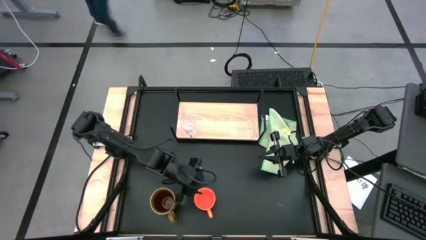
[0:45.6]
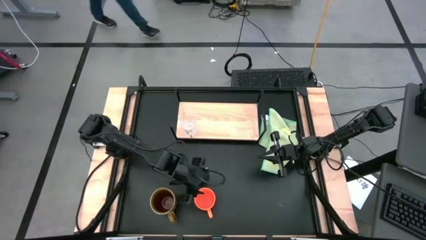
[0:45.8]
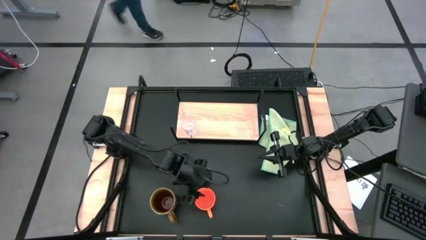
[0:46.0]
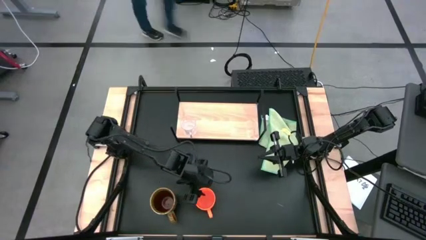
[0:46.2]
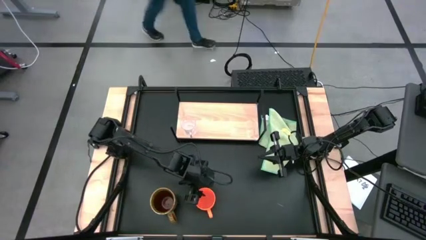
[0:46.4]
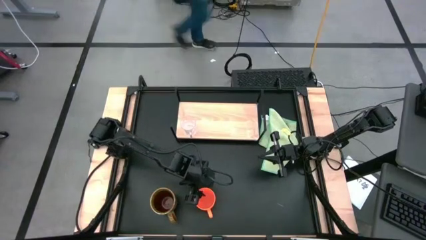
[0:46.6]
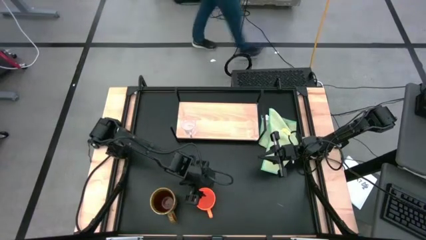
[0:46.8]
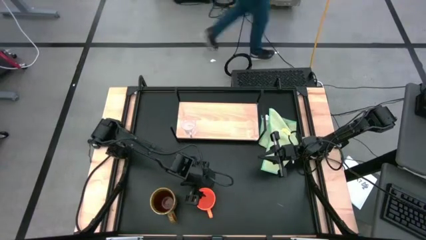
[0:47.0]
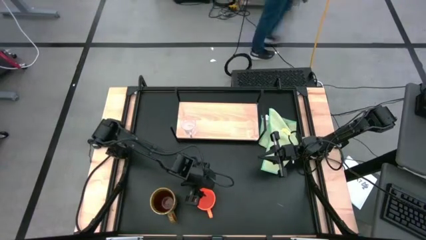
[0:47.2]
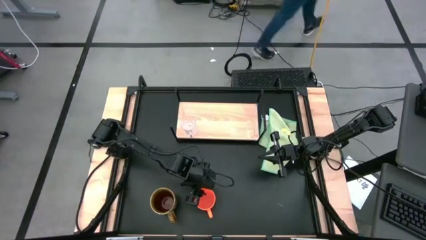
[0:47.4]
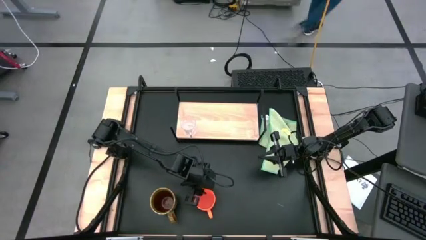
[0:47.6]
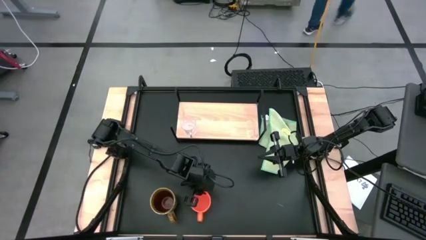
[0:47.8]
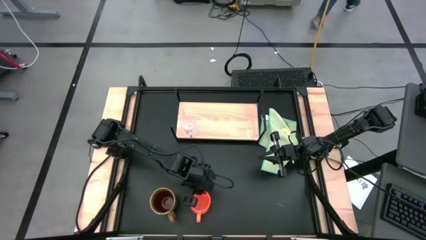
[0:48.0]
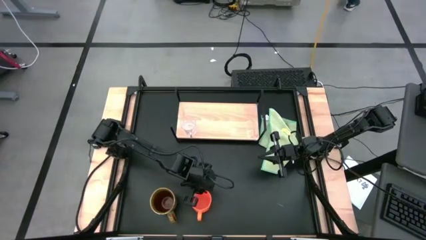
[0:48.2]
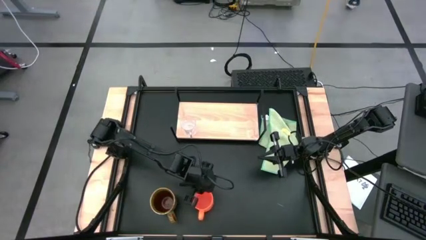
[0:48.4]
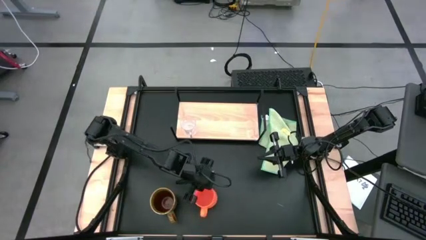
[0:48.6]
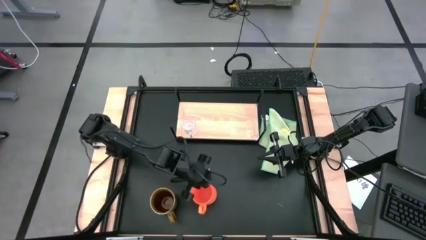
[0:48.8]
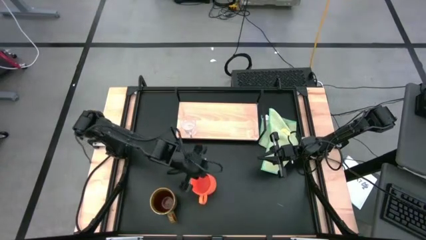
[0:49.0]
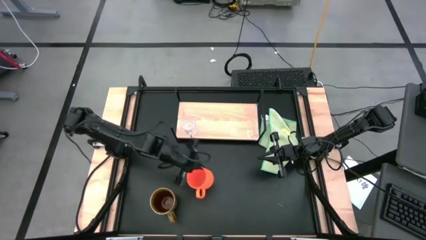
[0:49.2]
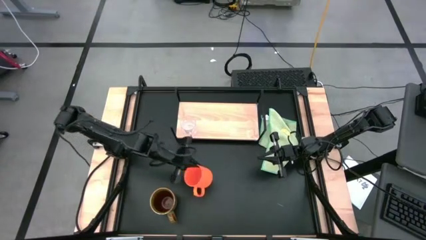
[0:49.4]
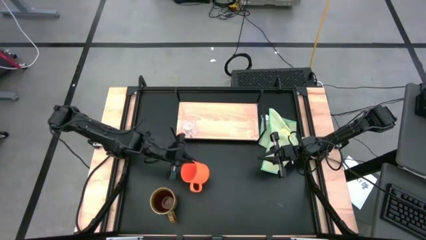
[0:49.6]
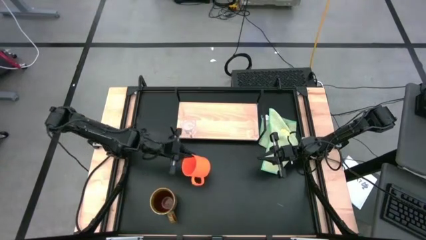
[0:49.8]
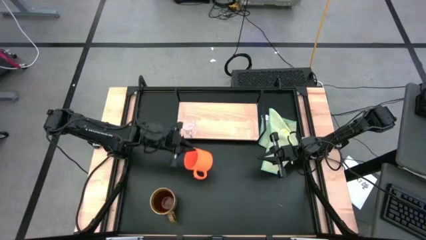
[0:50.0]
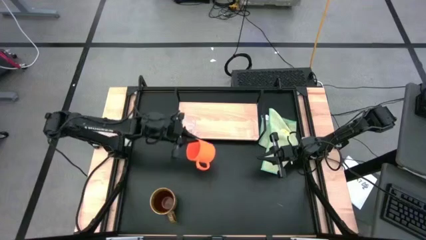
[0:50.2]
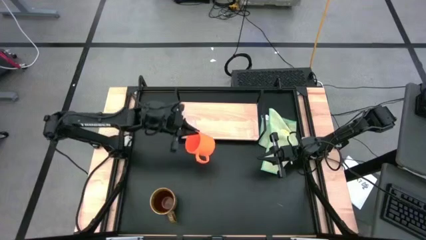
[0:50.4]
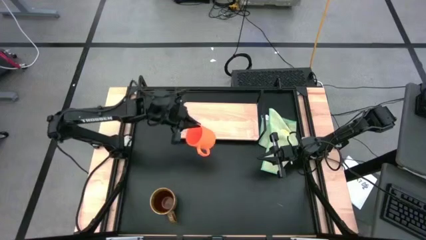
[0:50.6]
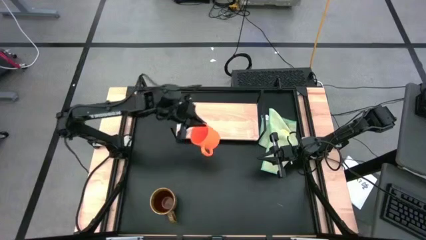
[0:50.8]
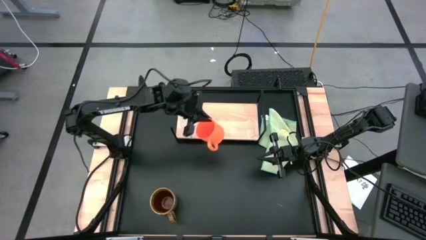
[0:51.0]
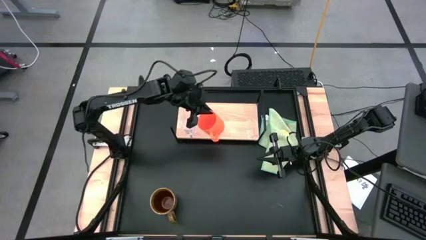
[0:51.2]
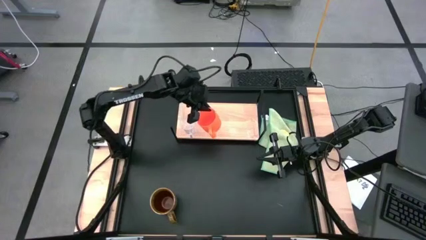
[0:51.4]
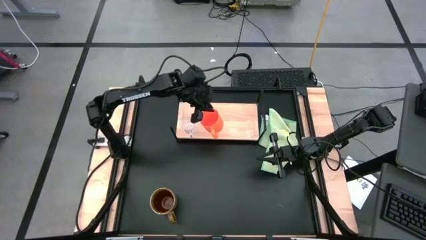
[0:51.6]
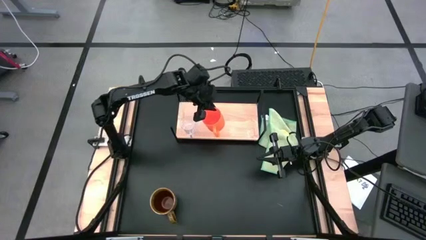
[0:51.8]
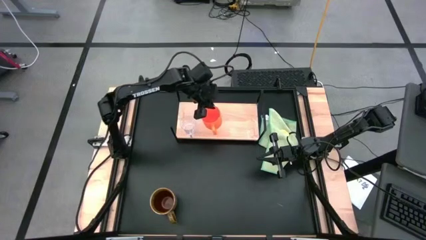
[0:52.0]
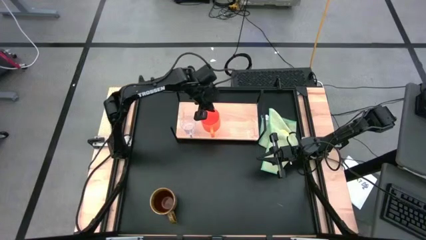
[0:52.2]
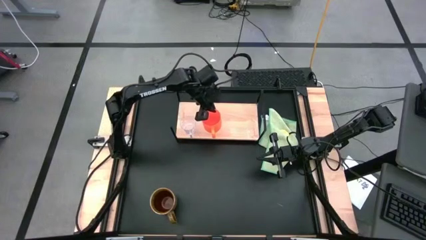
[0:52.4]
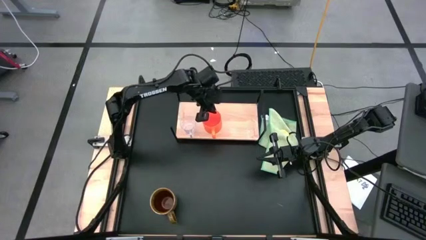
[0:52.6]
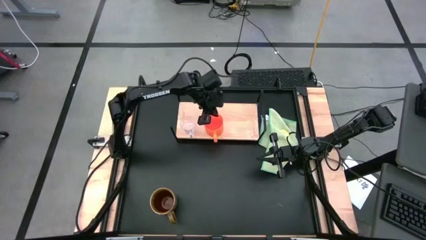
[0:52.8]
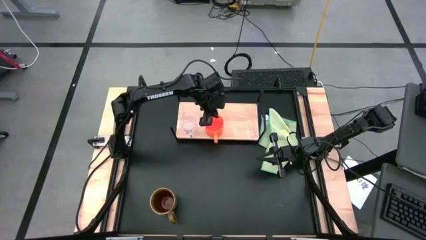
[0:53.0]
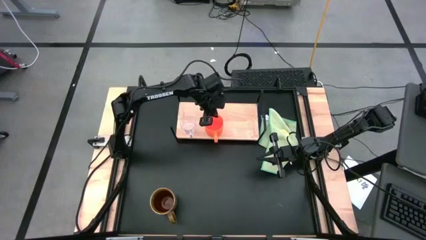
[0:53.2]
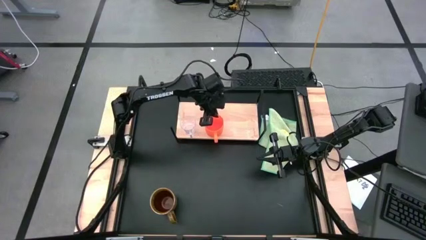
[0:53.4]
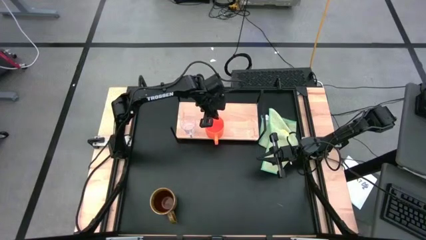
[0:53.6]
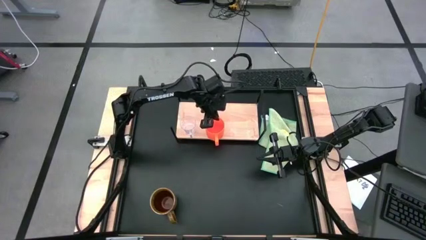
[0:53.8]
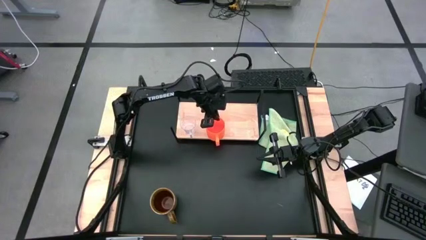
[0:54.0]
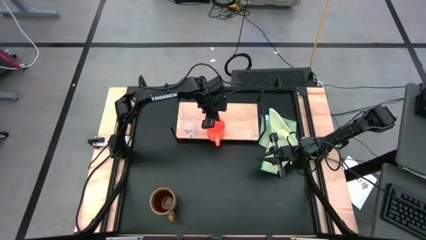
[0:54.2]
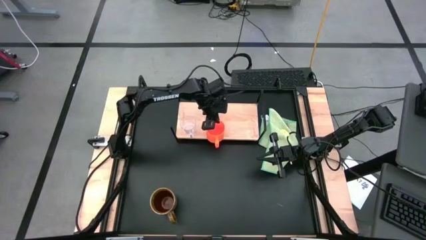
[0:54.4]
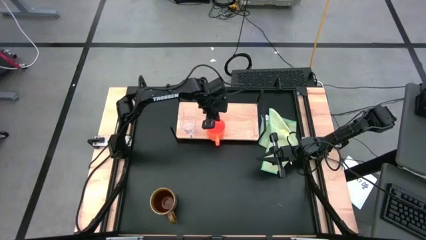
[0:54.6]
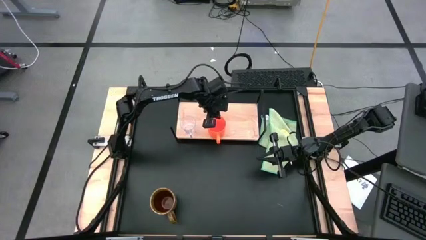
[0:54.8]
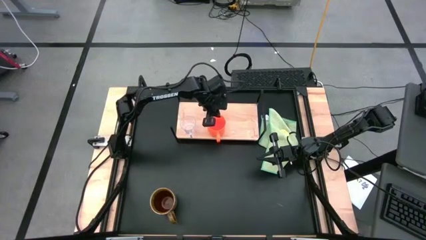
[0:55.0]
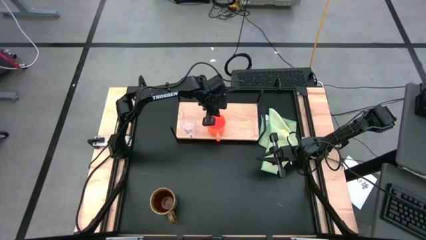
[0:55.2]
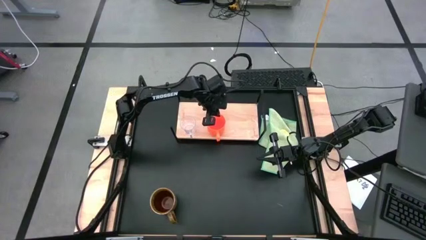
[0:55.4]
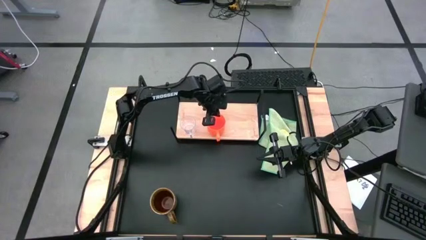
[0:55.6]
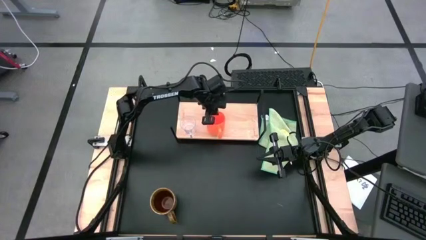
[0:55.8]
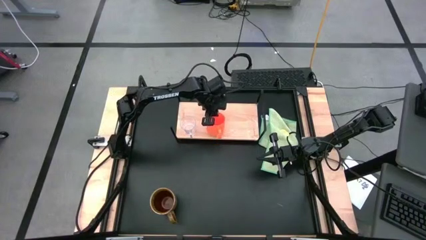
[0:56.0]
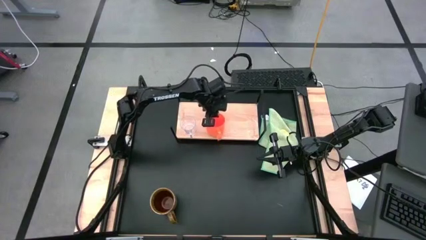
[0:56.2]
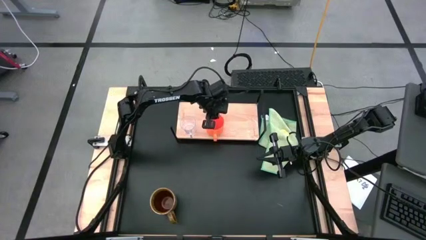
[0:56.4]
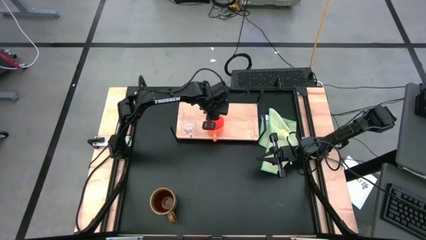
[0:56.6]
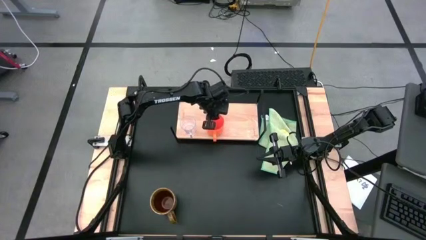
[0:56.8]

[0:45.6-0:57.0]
Task: Stack small to large cups/mugs on shelf
Put the orange mug on the shelf
